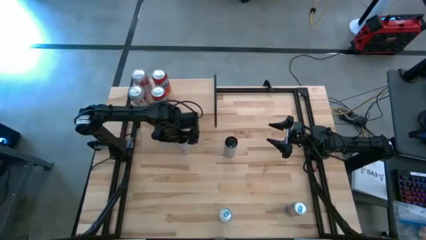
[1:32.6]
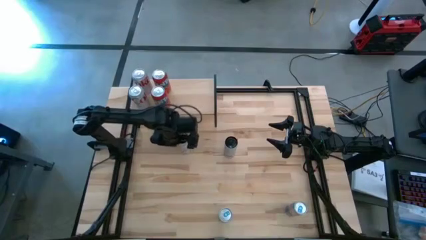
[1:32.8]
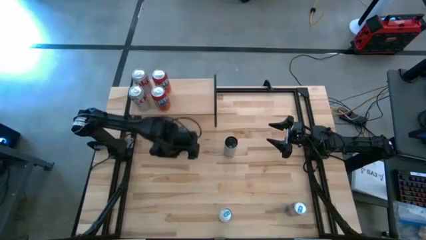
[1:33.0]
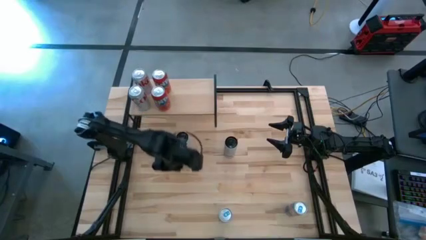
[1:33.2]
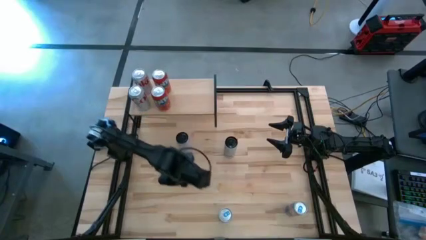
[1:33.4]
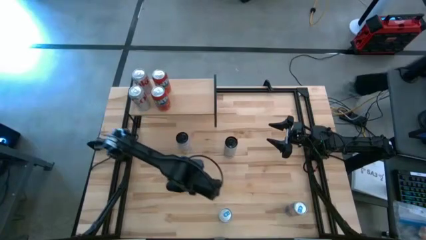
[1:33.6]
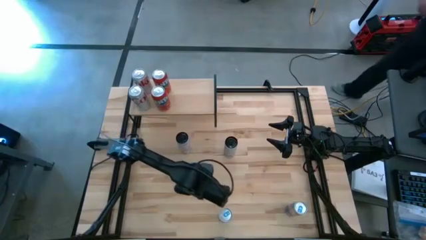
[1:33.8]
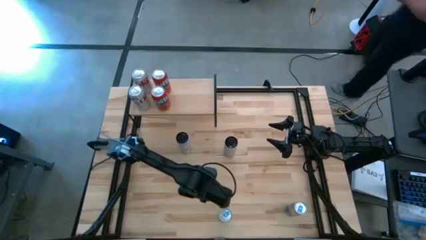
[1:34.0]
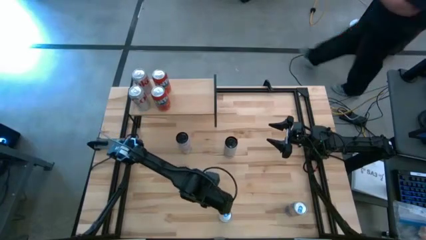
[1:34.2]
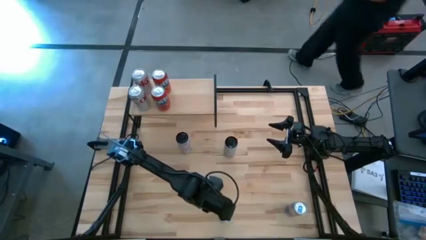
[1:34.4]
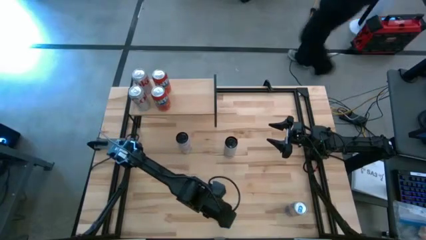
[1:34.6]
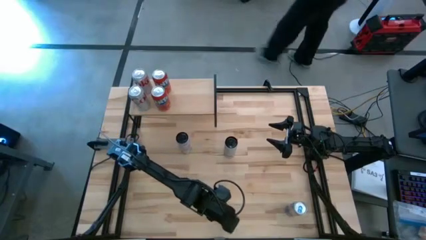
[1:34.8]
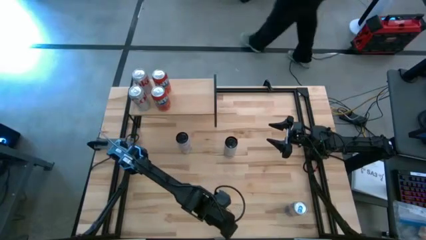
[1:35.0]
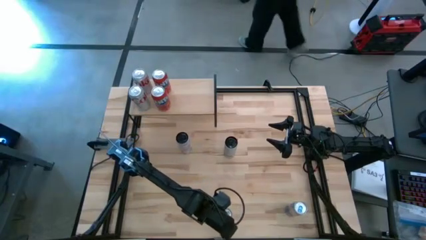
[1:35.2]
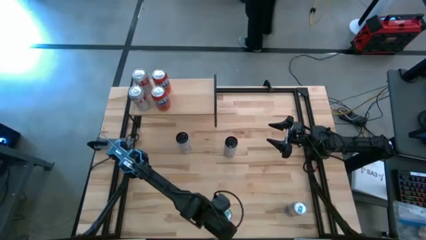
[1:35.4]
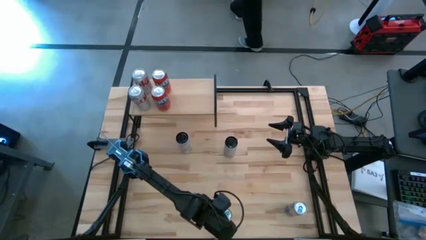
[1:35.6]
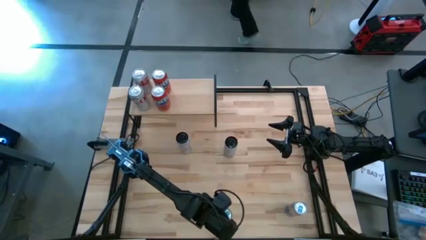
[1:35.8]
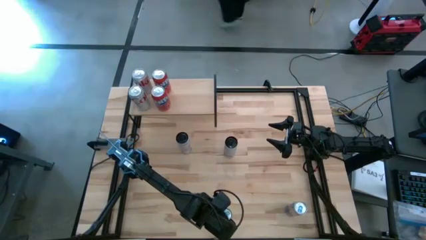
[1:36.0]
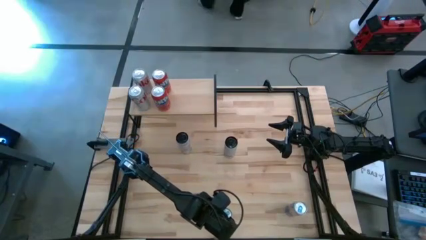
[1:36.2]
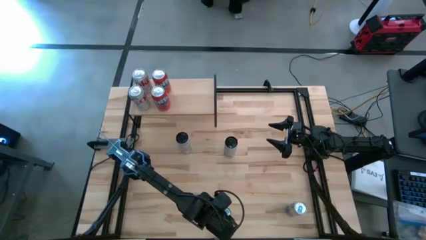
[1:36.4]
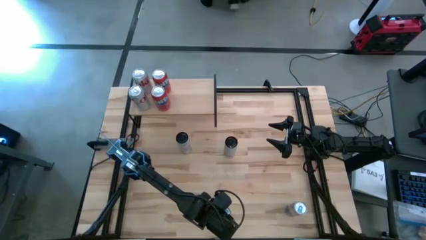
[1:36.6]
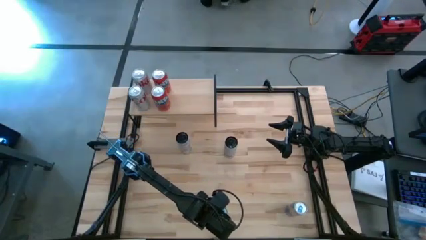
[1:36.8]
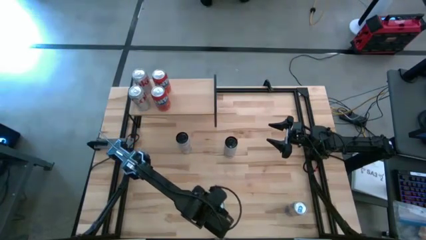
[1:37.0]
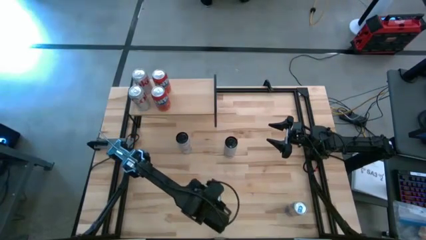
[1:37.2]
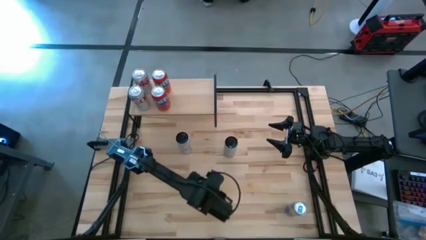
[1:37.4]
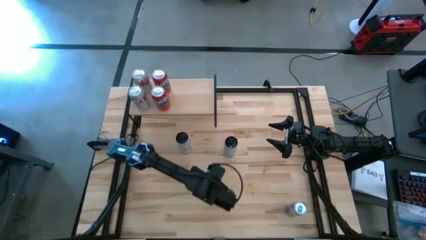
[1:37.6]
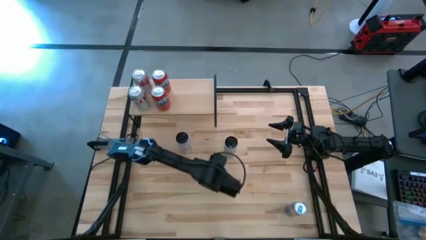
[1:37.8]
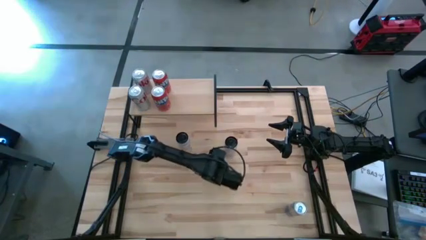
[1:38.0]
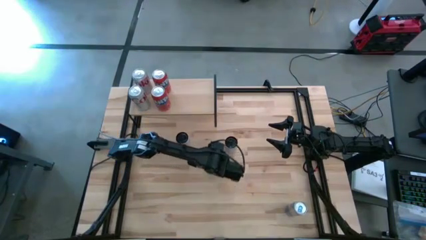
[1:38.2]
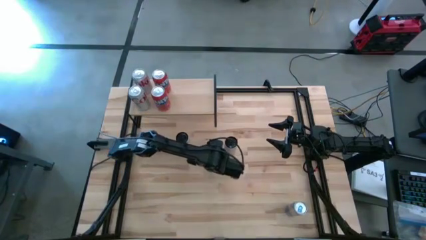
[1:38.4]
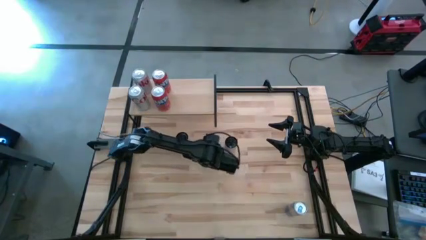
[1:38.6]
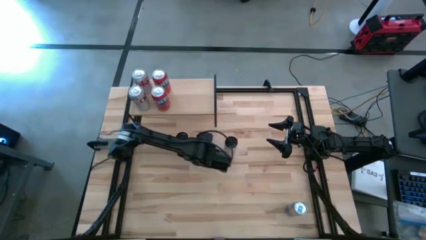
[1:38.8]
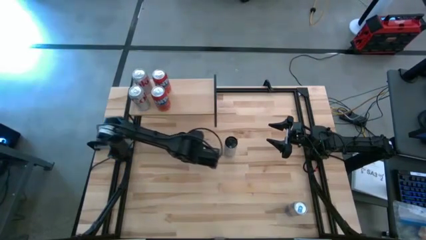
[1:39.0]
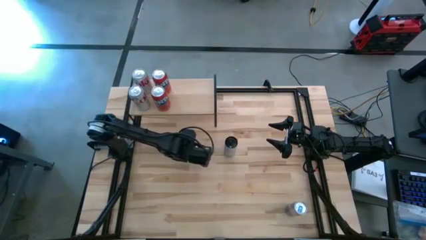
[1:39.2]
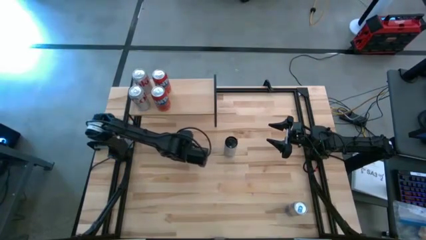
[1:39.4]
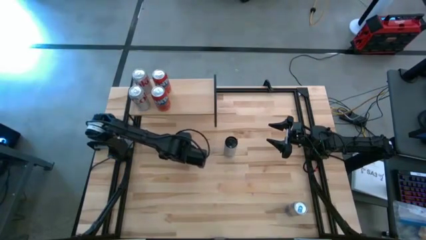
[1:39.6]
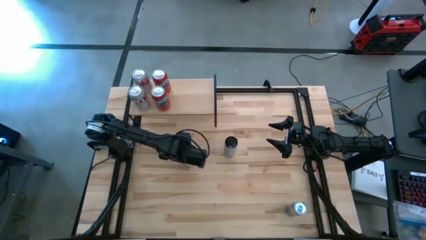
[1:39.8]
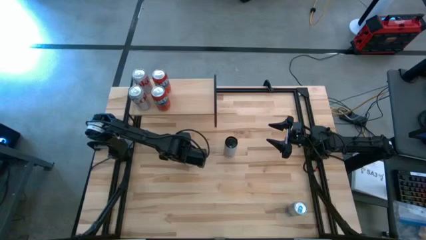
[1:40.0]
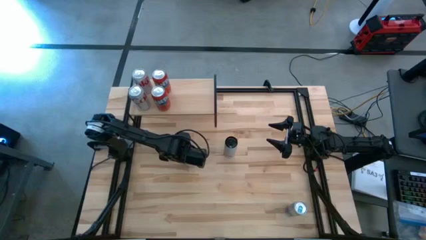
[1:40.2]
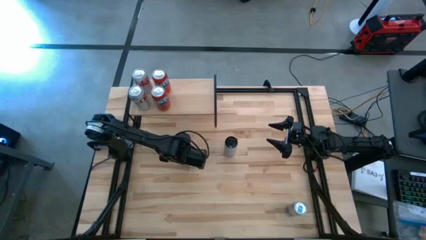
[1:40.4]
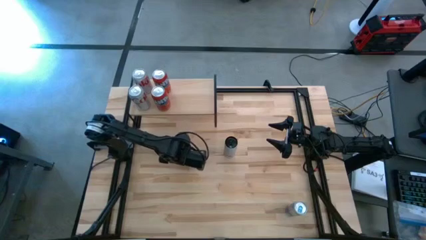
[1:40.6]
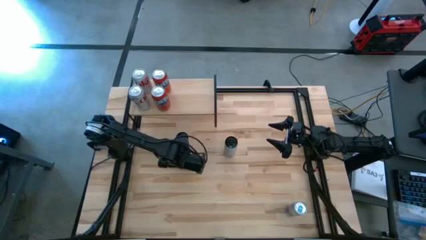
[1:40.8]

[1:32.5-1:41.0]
Task: Place canned beverage on shelf
Move the left blue soda can below the left white pink soda can

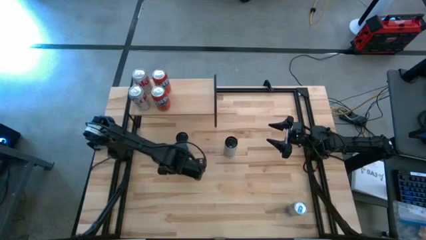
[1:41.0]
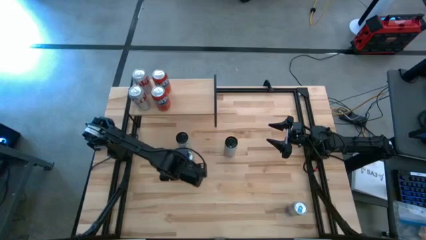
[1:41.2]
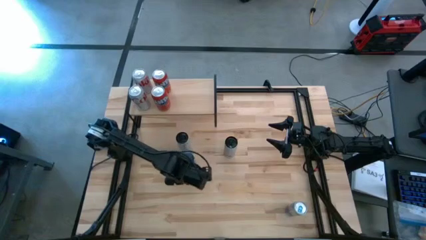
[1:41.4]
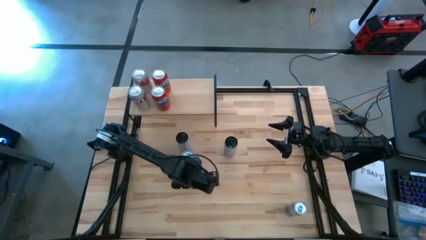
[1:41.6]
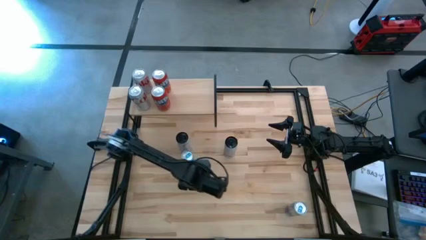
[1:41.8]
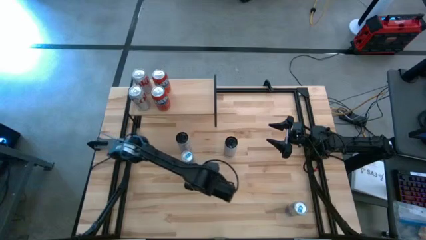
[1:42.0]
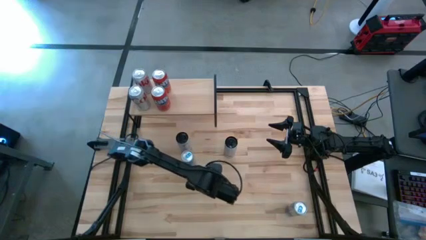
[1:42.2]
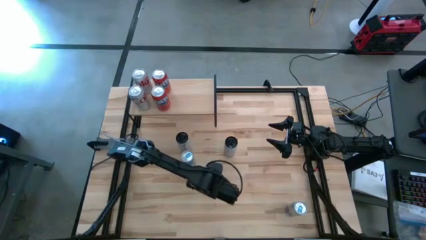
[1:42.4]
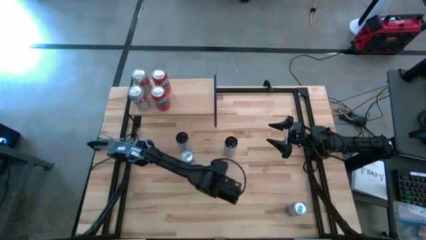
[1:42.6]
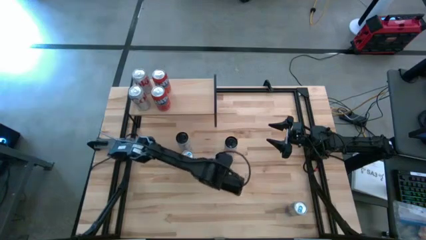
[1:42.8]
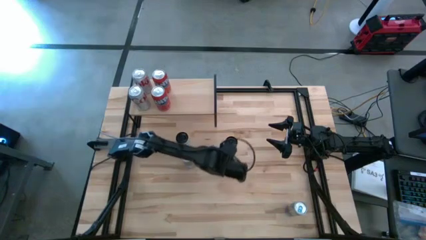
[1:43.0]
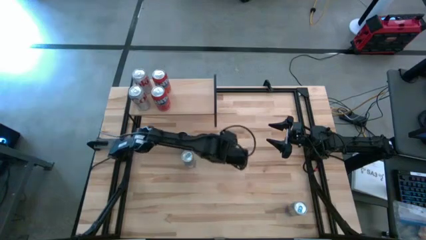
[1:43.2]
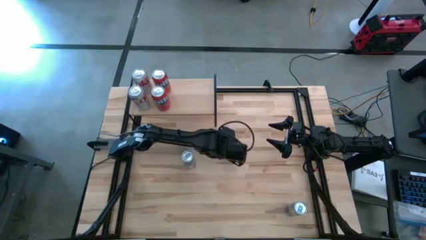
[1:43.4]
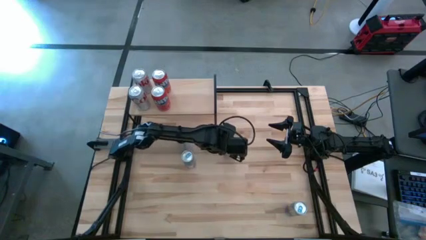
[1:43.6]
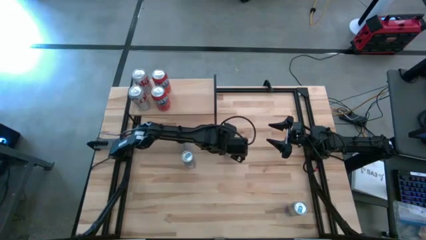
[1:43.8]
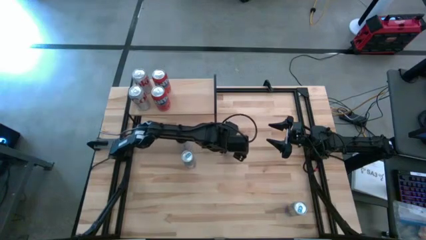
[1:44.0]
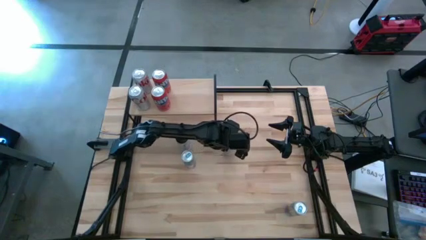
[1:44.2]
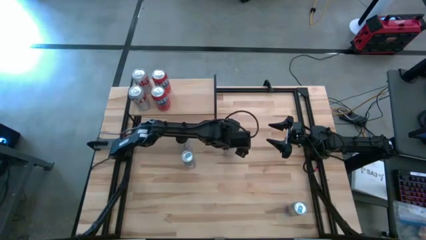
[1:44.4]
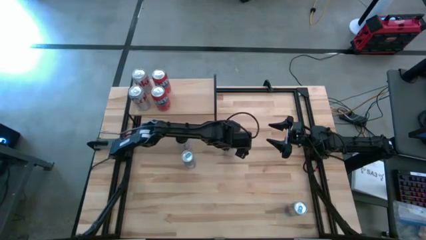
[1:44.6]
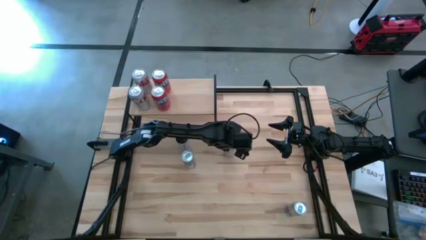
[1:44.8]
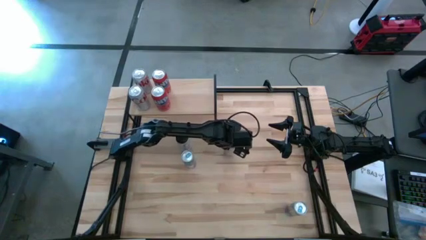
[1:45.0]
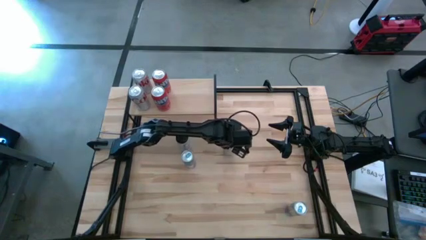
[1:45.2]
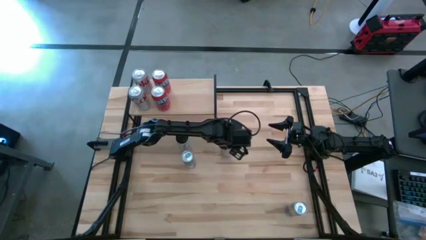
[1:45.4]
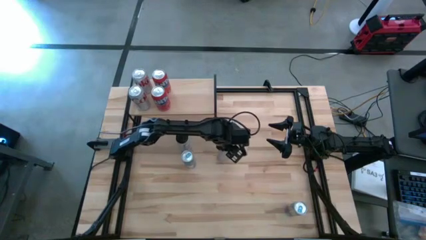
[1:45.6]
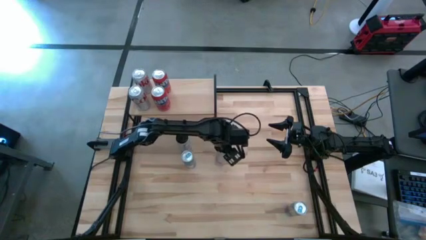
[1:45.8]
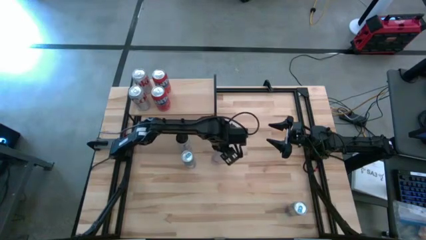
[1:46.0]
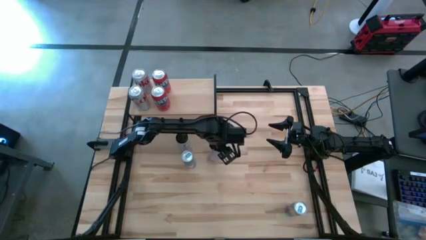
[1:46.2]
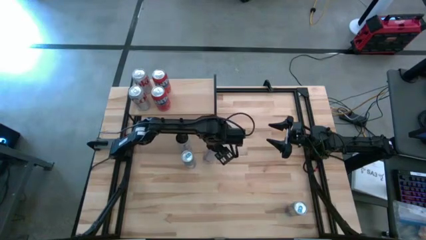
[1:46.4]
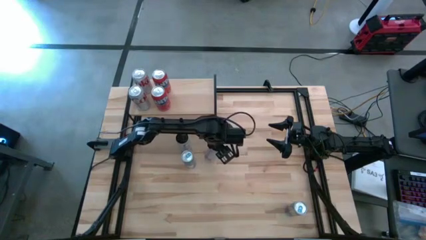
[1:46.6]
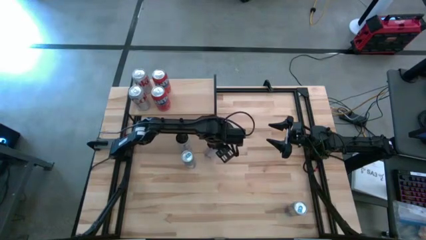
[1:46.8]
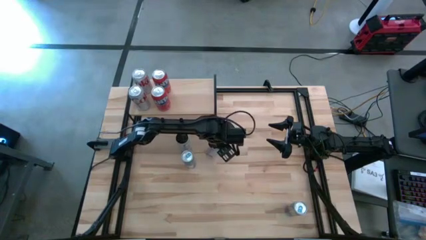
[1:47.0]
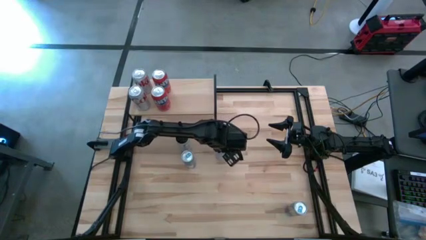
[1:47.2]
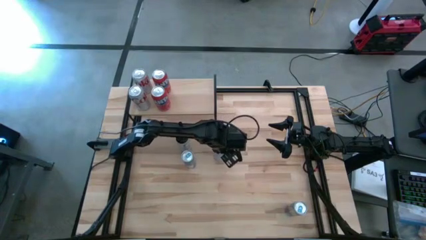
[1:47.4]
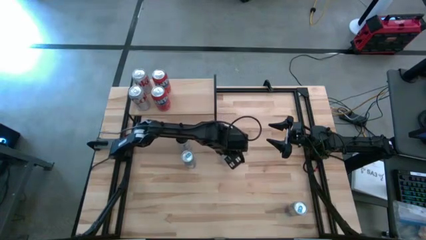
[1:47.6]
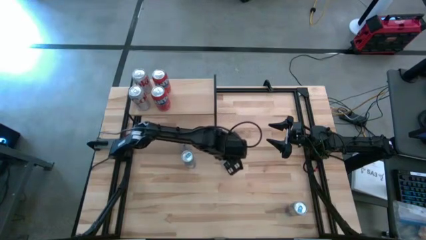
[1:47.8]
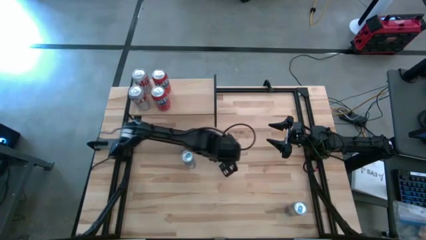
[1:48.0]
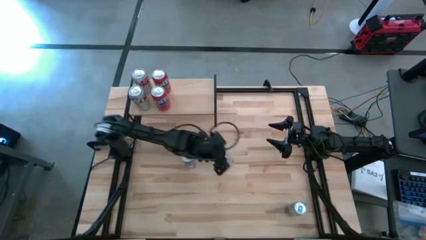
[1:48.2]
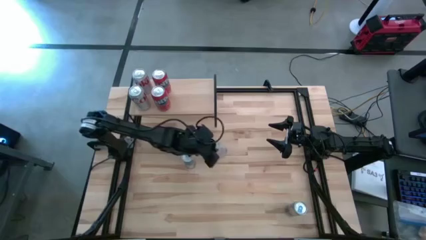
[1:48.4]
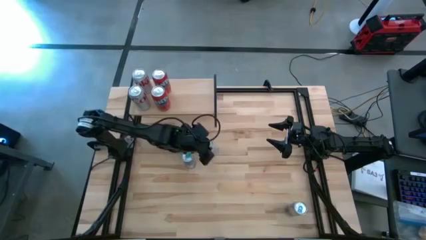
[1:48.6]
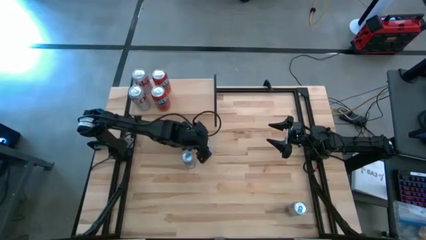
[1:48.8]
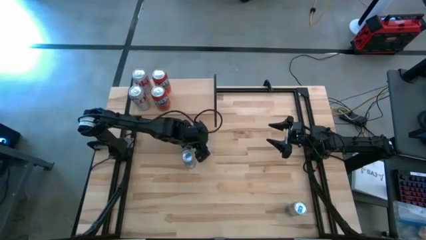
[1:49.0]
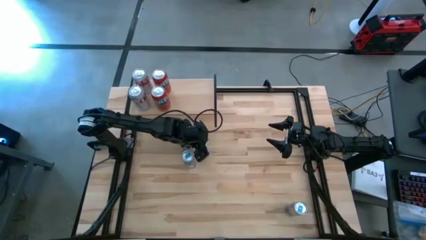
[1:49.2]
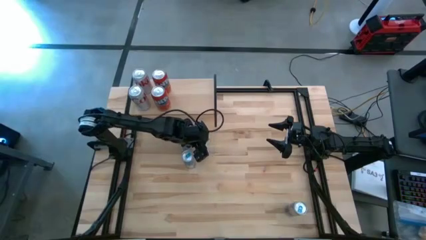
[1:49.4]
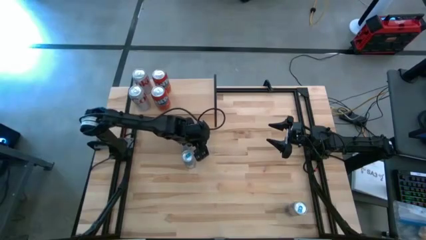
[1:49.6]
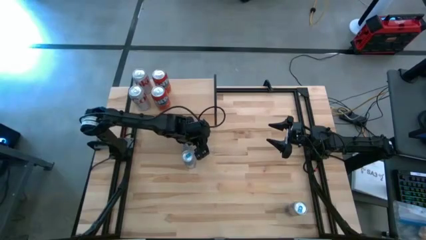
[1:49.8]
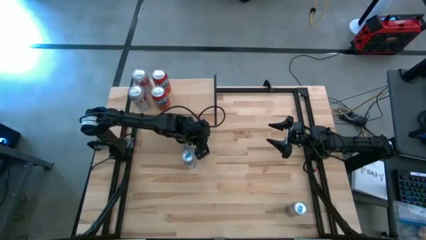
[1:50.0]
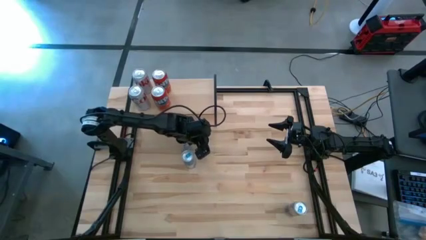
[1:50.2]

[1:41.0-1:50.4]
Adjust the right white and pink soda can
